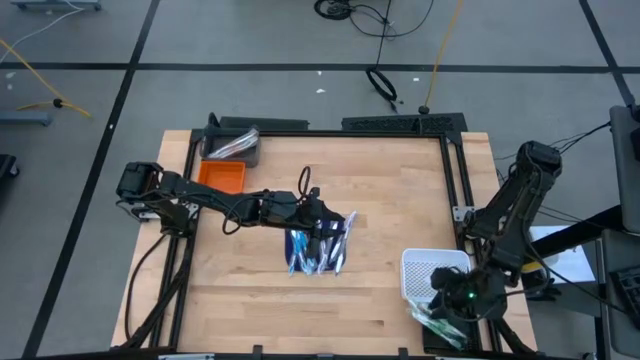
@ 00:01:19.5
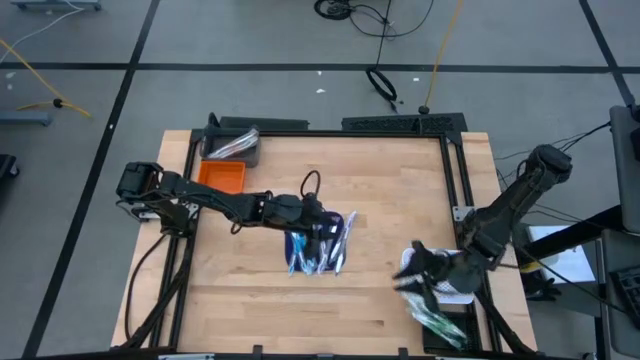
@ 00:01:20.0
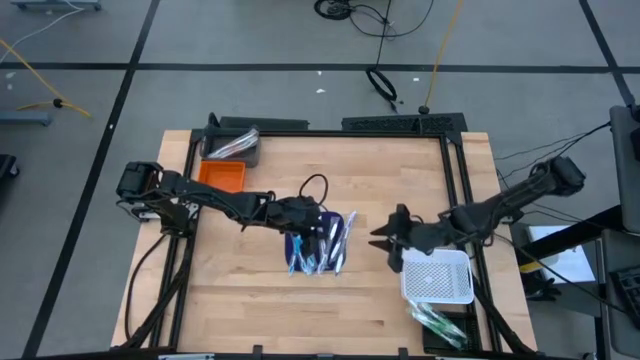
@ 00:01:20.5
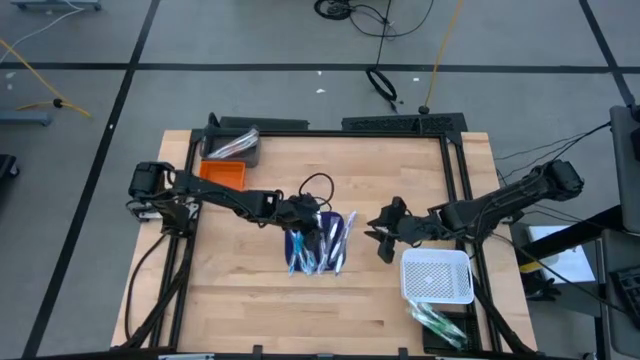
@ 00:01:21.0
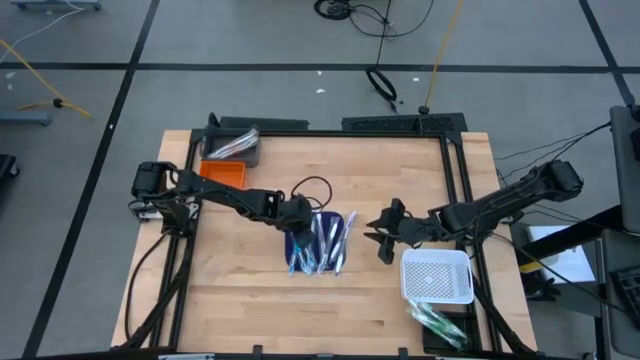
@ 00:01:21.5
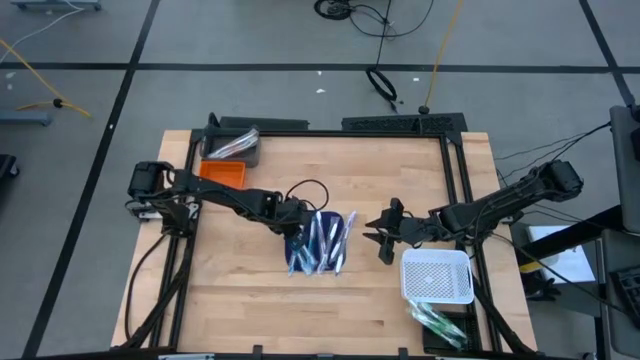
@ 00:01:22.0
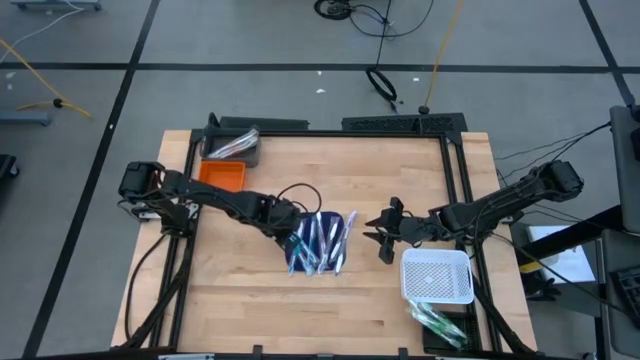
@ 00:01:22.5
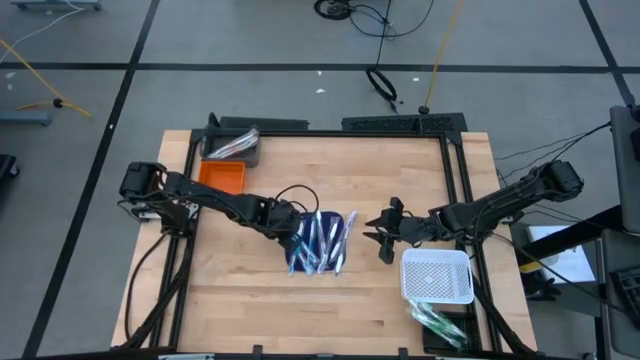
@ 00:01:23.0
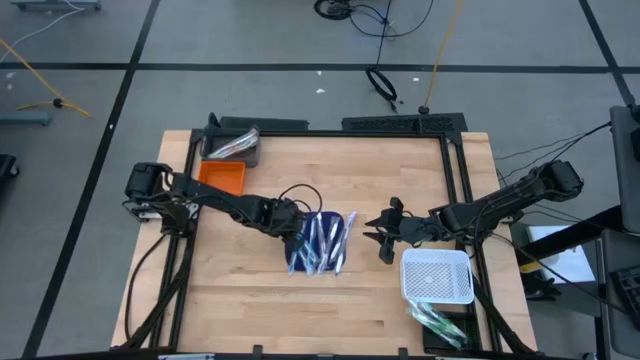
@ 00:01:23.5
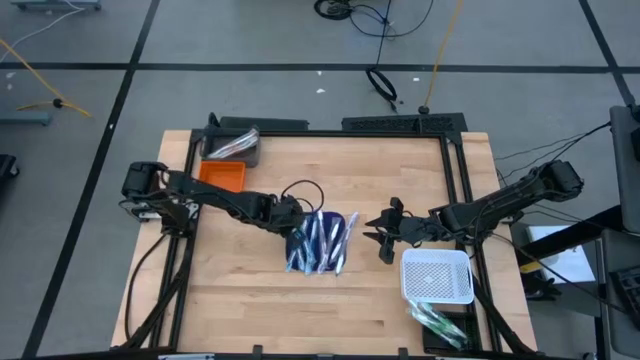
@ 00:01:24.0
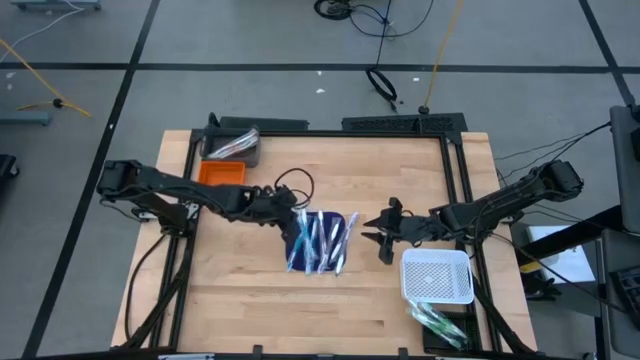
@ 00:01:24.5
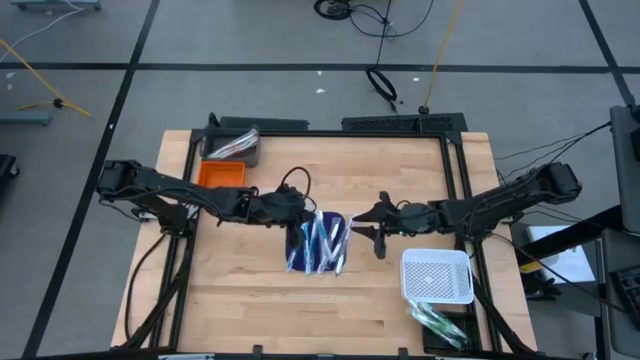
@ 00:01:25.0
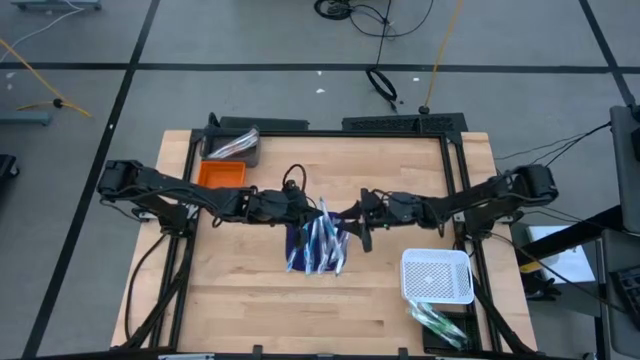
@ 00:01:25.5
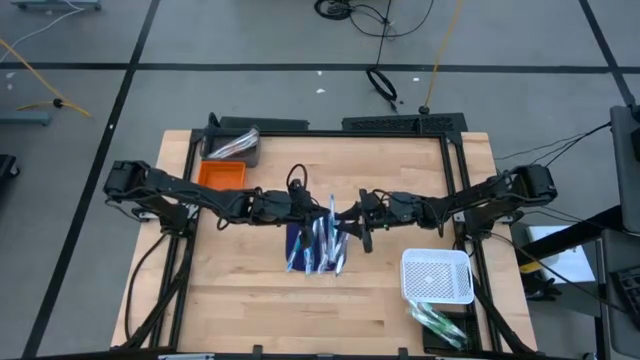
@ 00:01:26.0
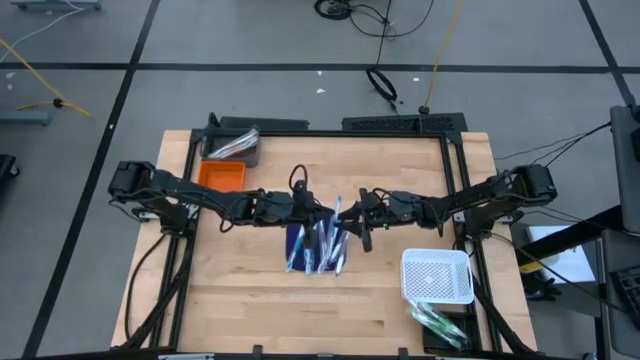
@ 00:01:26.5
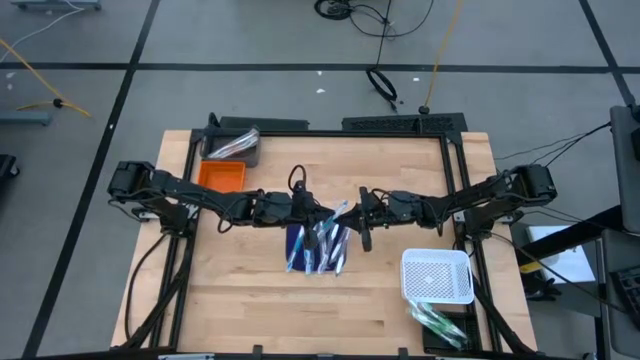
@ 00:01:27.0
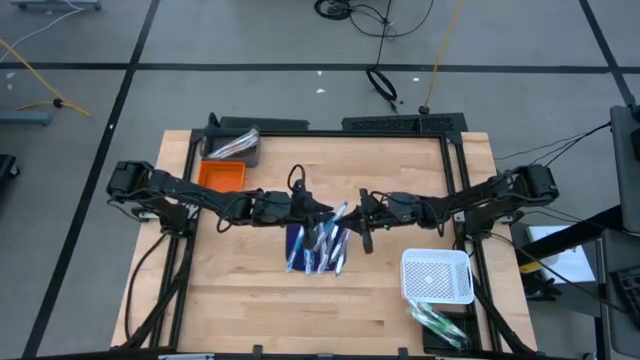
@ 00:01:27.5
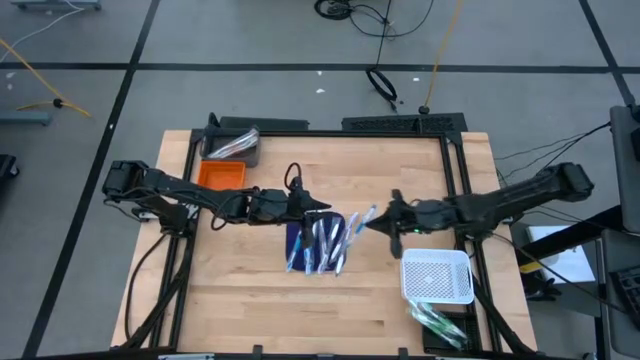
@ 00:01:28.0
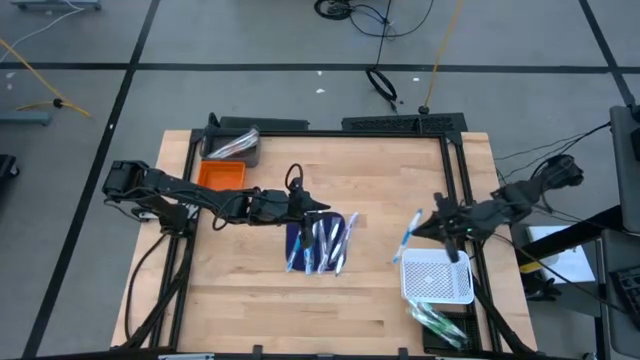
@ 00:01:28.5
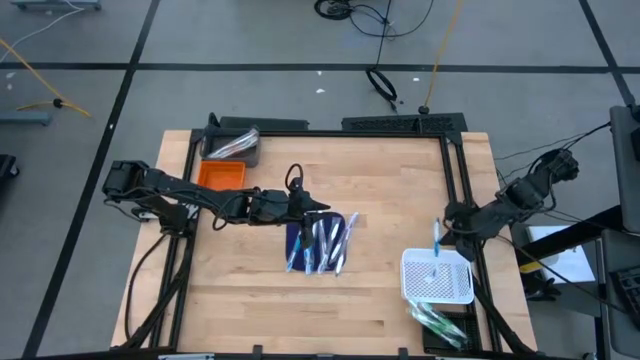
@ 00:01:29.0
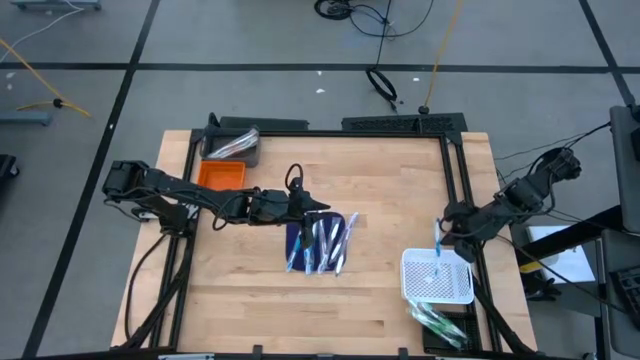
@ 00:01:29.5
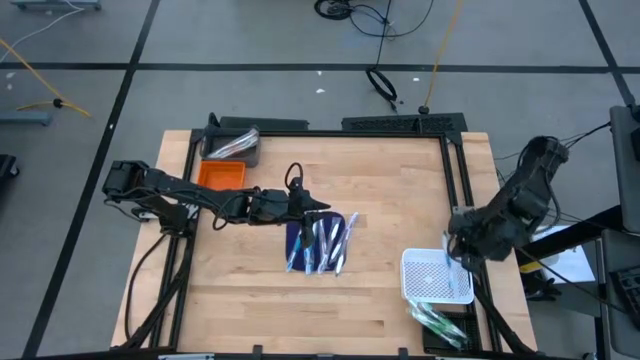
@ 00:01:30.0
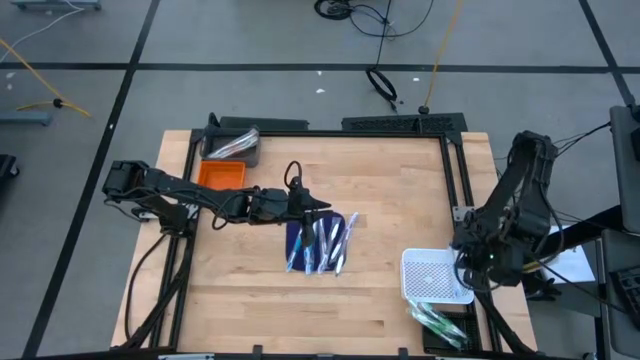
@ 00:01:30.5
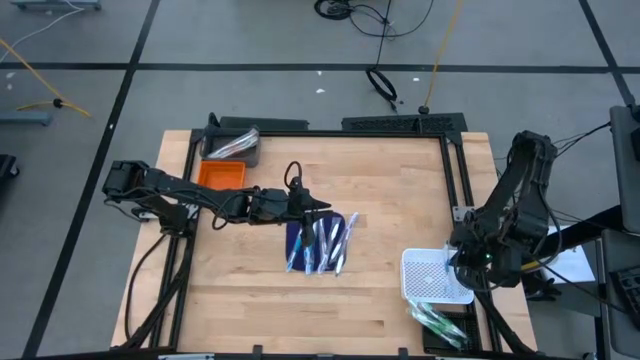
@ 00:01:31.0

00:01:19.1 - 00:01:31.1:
Task: Pick & Place Toothbrushes
Put the blue toothbrush into the white bin

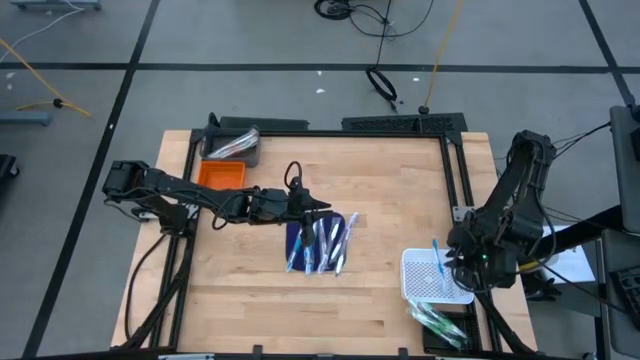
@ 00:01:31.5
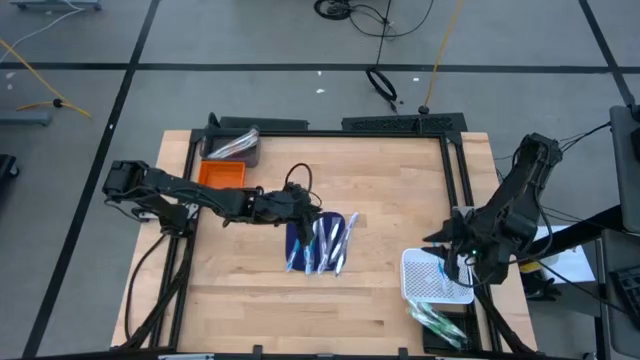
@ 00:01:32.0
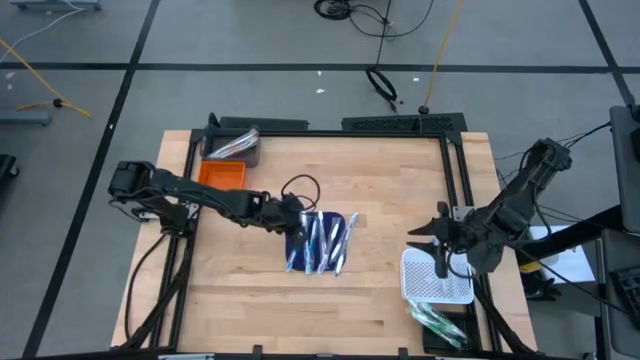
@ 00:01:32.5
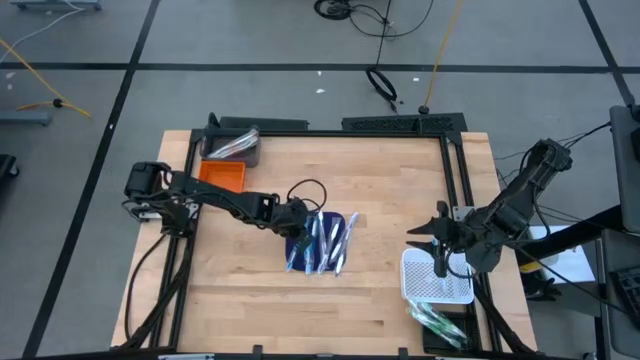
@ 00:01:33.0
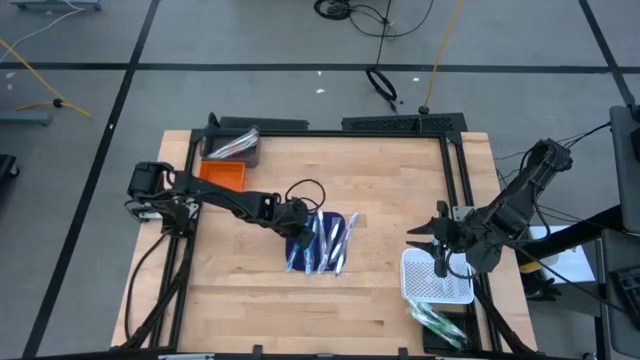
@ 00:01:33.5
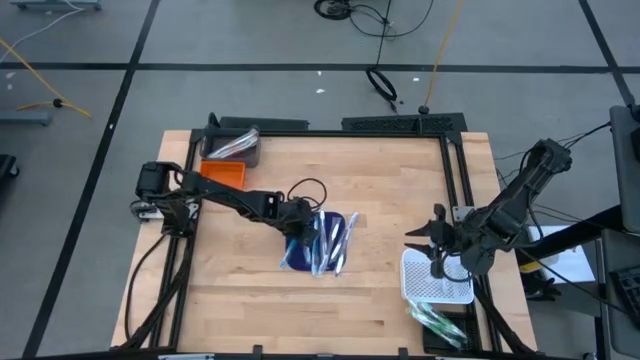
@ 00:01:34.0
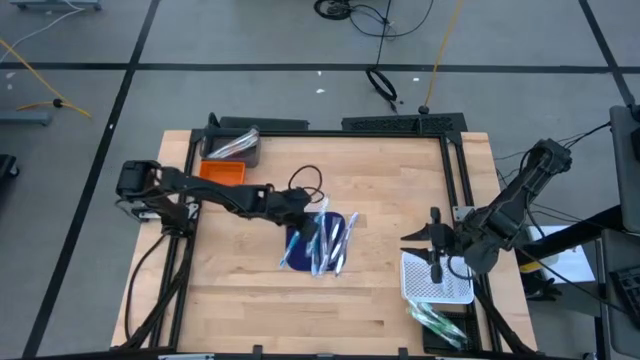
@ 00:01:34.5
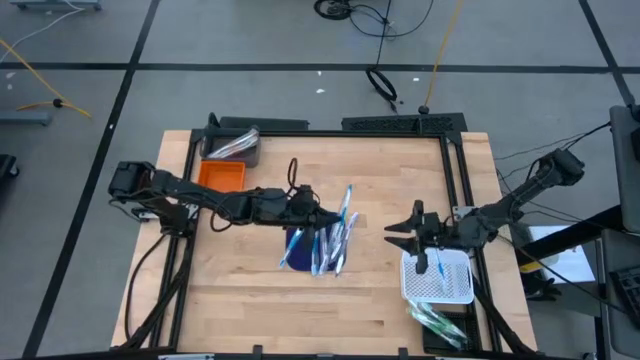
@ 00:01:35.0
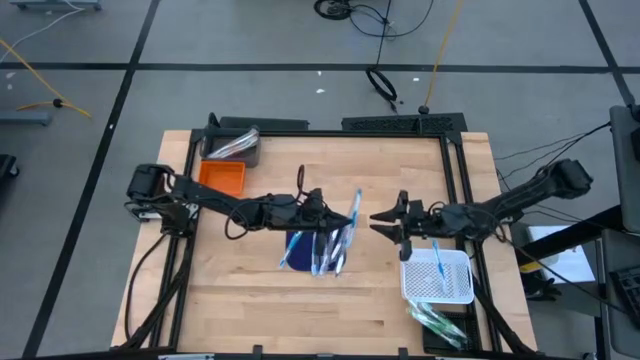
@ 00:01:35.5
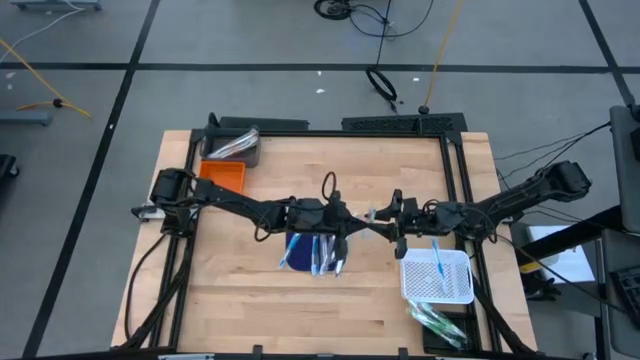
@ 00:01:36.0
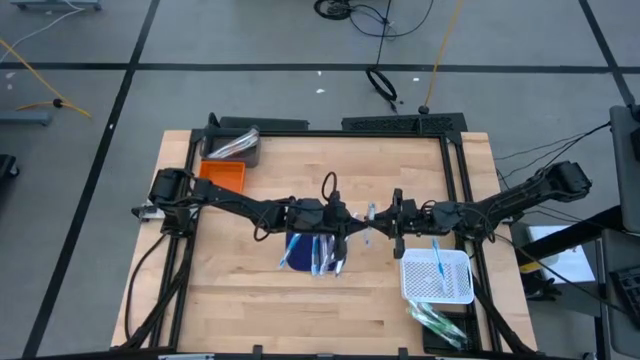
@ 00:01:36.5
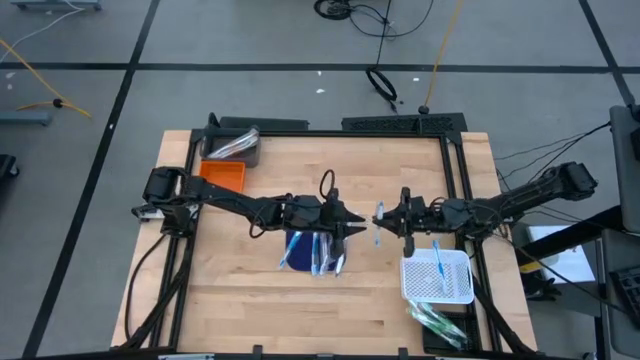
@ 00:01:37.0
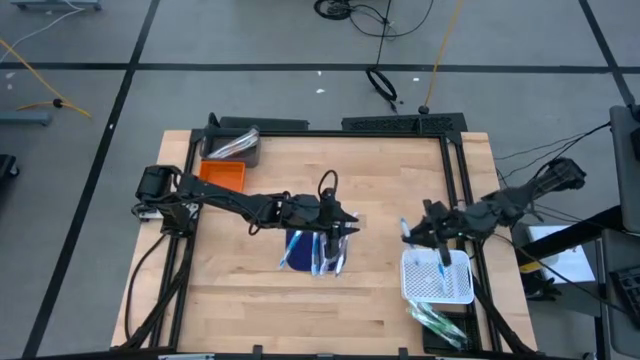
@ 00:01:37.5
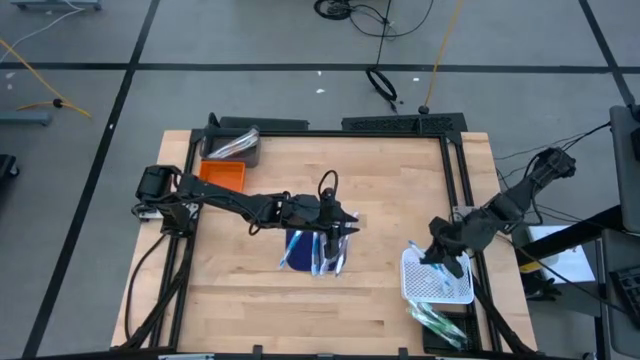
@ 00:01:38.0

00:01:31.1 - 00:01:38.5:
Put the blue toothbrush into the white bin

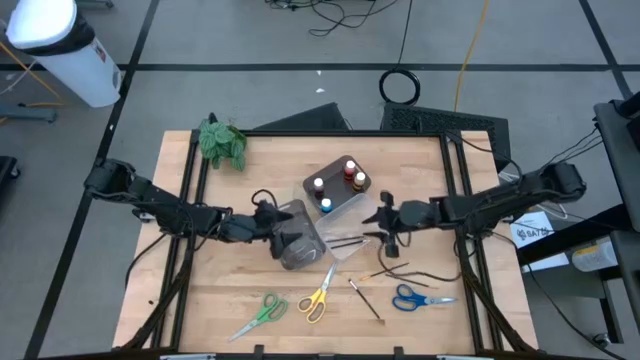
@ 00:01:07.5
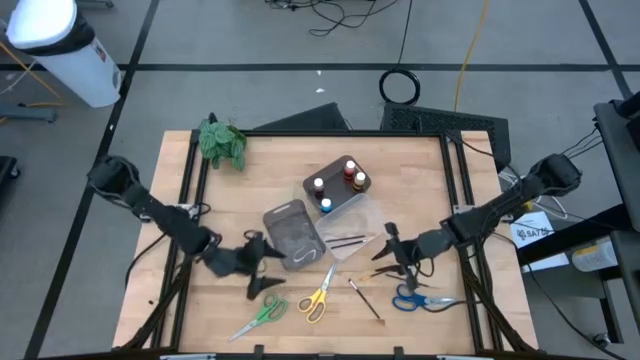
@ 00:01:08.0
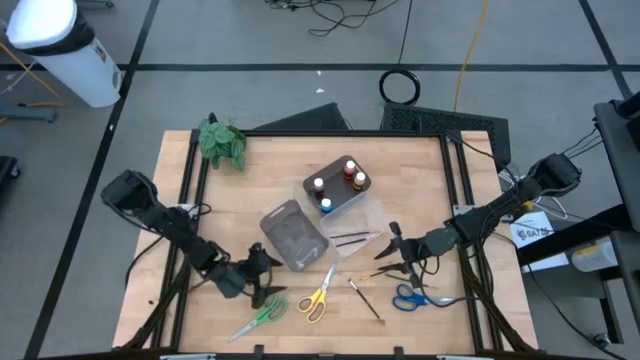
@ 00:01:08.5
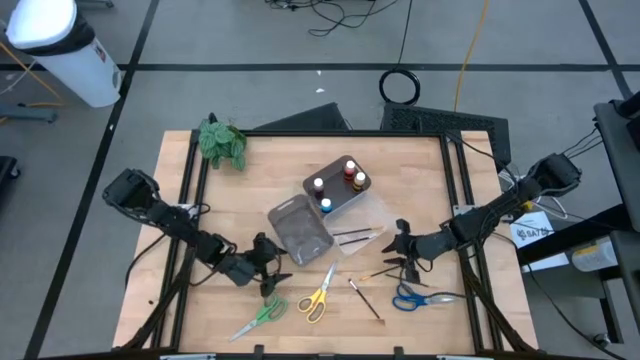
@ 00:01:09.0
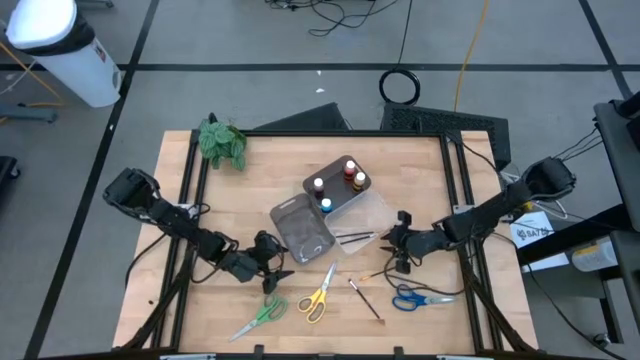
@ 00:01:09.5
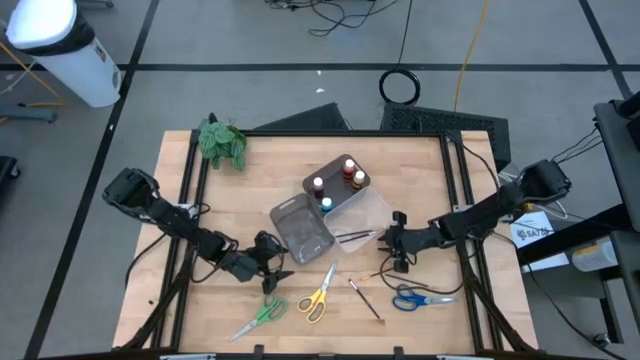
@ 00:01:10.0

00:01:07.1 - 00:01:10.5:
Task: Pick & Place Paint Supplies
Adjust the bins
